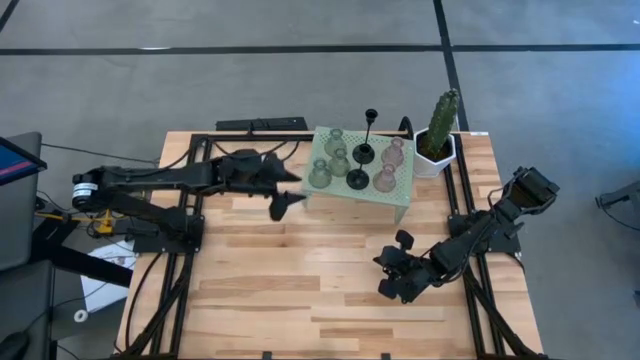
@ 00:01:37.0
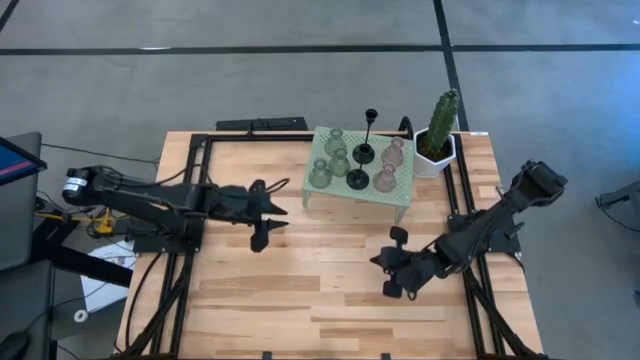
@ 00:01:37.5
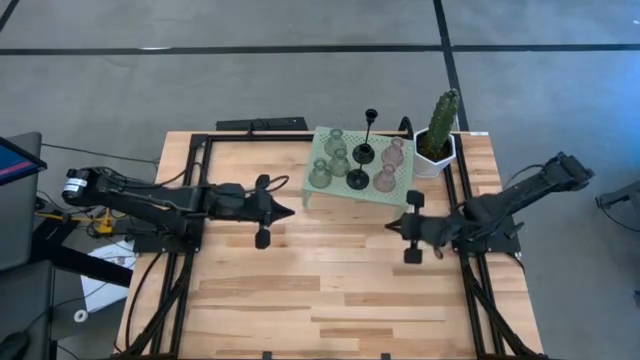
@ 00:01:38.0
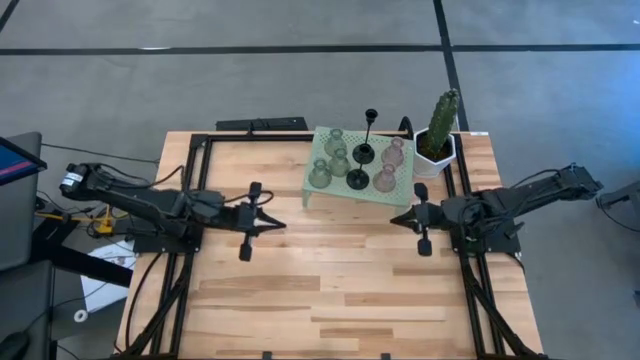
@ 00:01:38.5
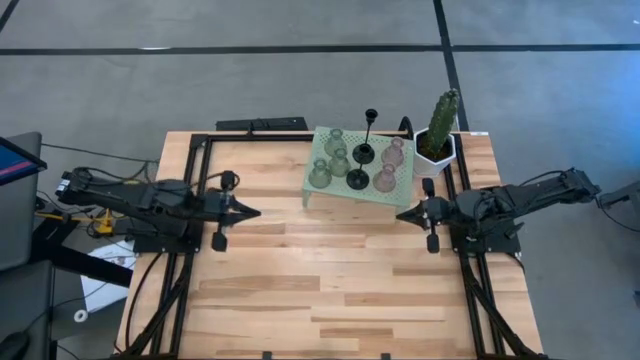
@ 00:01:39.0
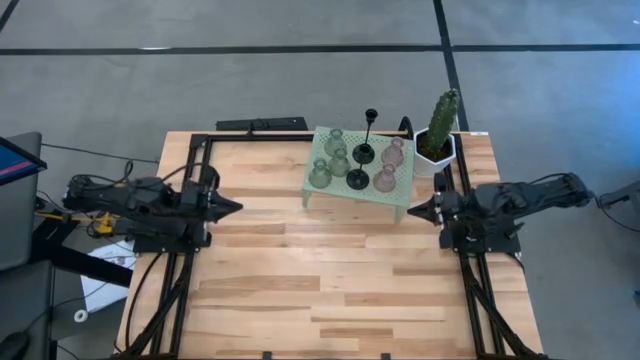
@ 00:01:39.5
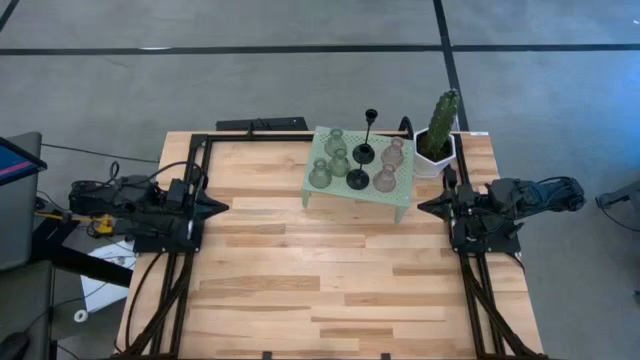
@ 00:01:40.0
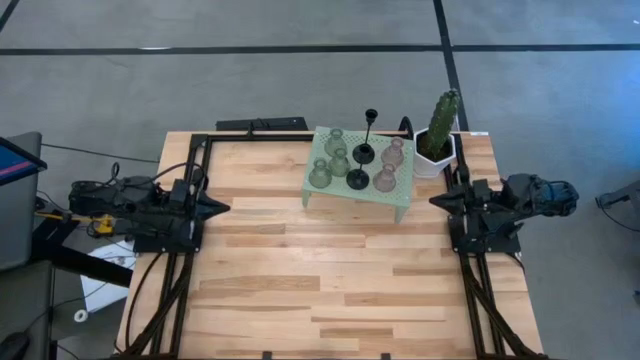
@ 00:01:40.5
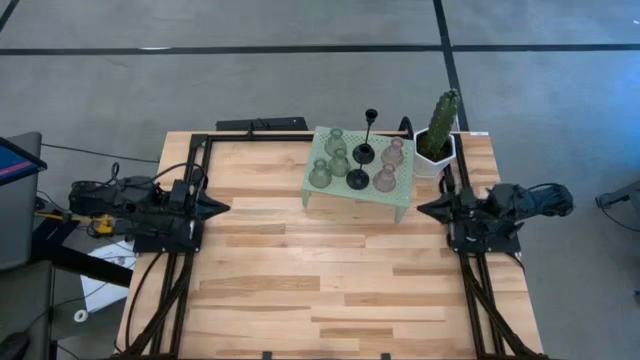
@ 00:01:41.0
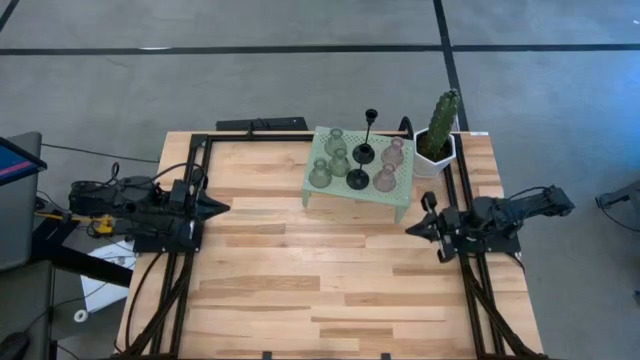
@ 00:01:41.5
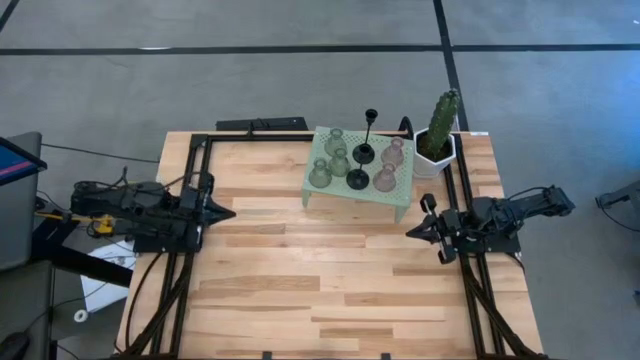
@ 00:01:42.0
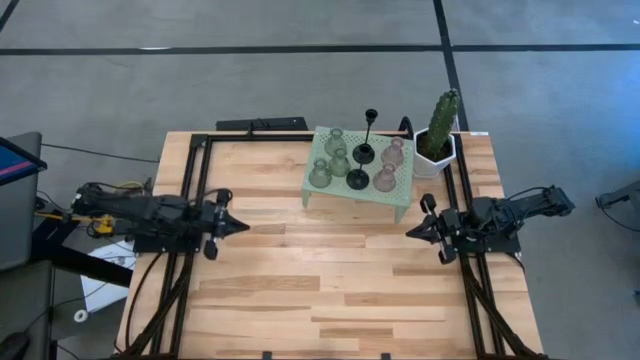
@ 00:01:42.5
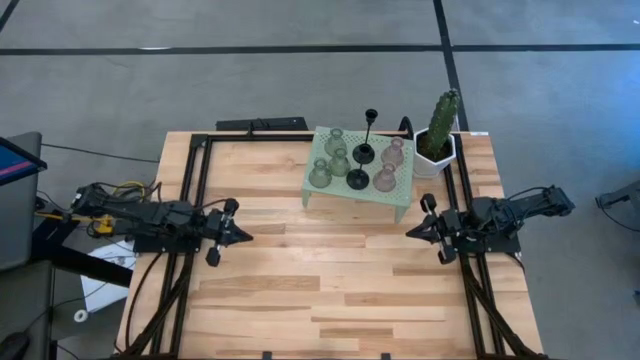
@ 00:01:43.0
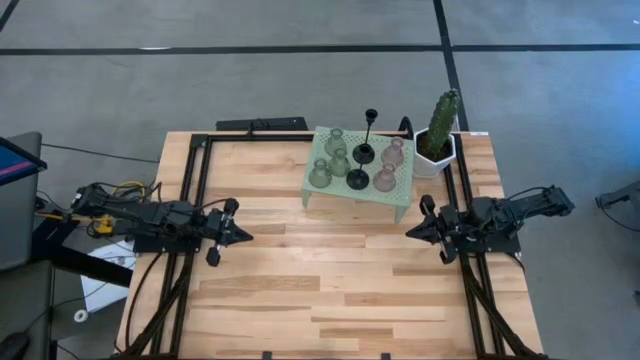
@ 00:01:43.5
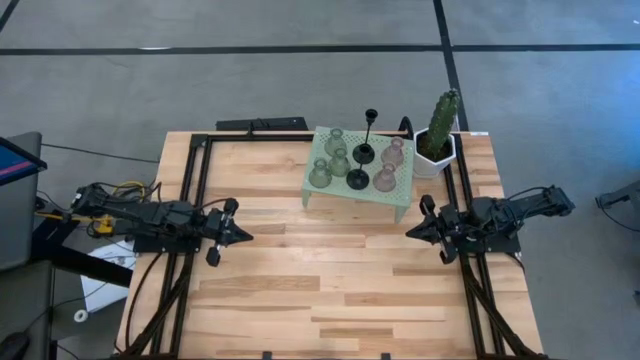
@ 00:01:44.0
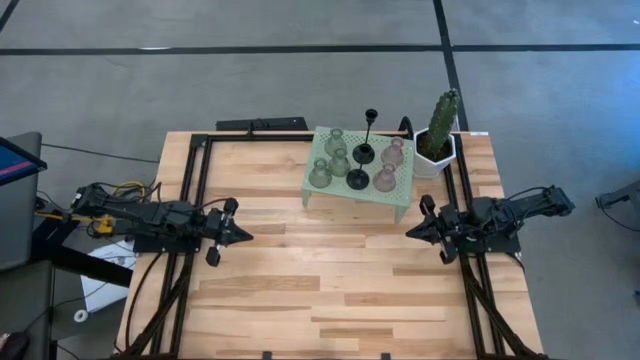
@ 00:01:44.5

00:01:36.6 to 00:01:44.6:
Task: Pick & Place candle stick holders
Return to Home Position

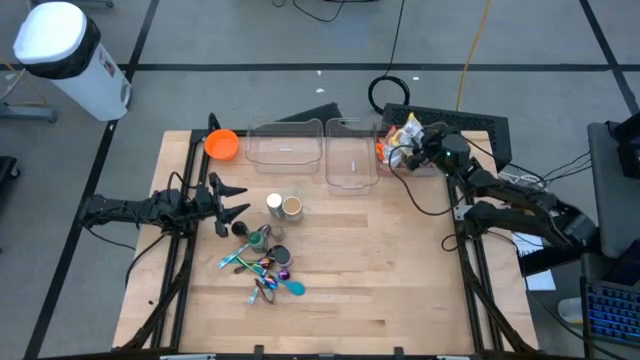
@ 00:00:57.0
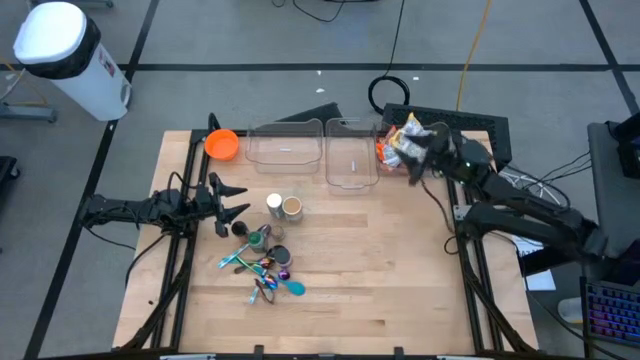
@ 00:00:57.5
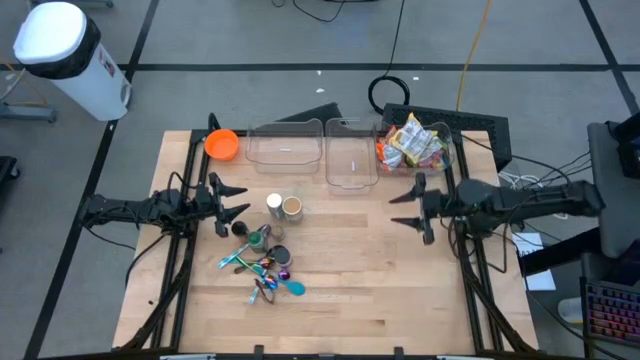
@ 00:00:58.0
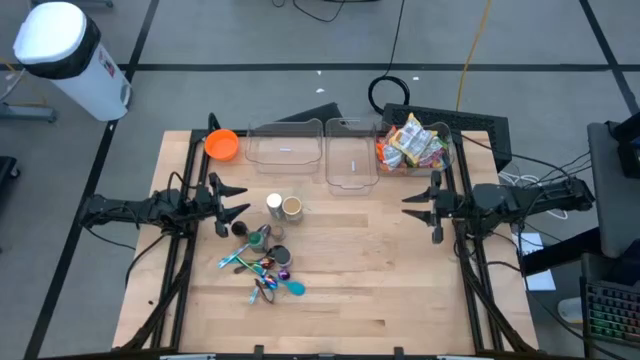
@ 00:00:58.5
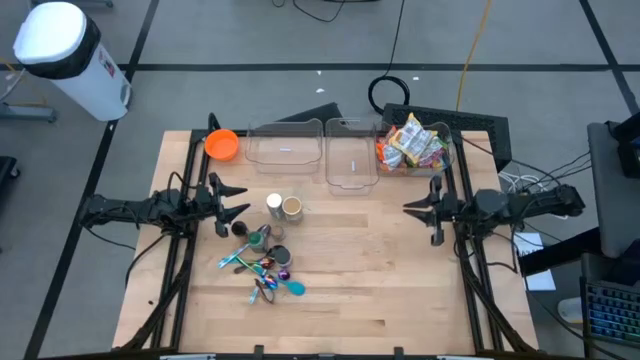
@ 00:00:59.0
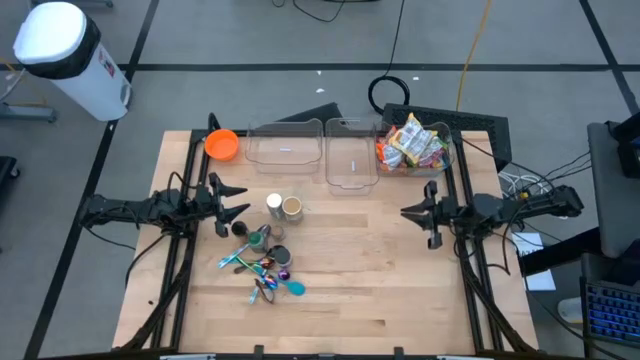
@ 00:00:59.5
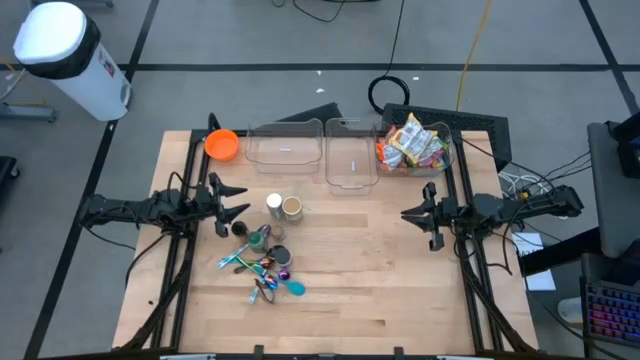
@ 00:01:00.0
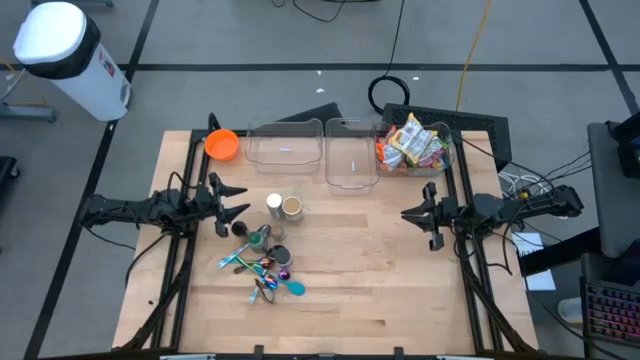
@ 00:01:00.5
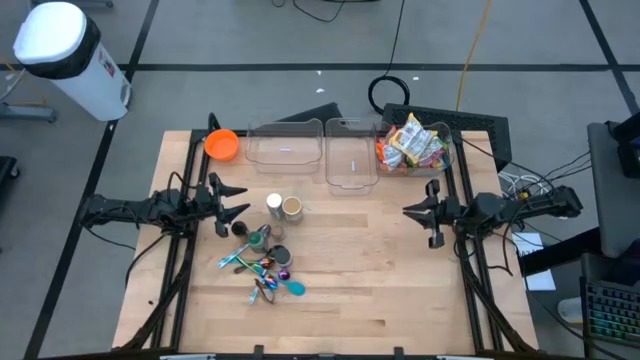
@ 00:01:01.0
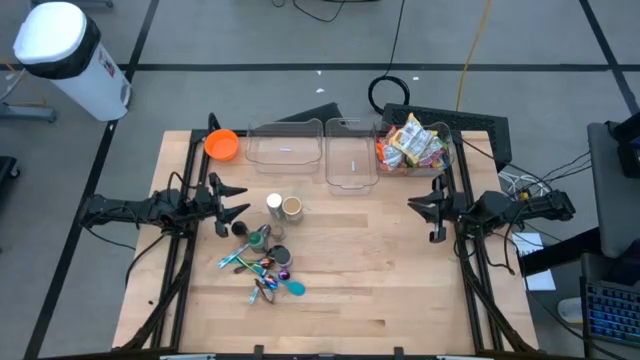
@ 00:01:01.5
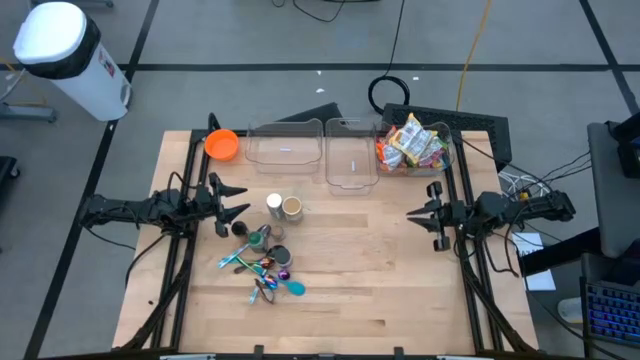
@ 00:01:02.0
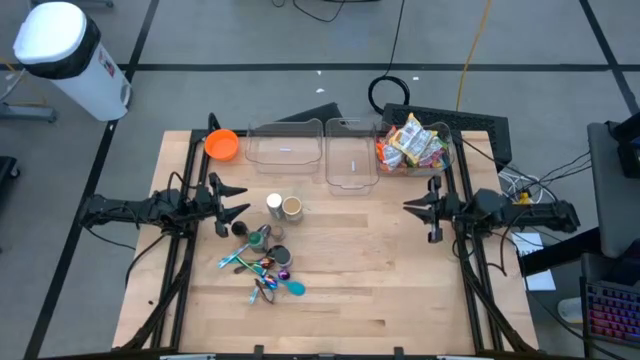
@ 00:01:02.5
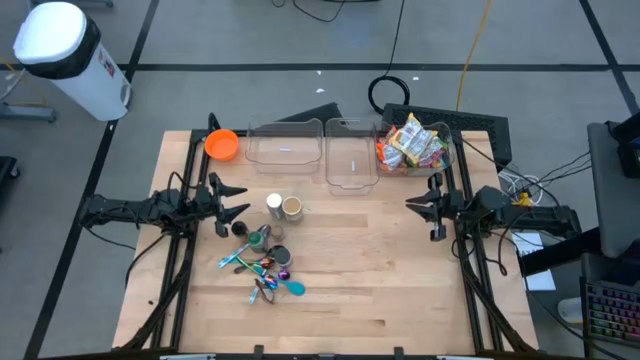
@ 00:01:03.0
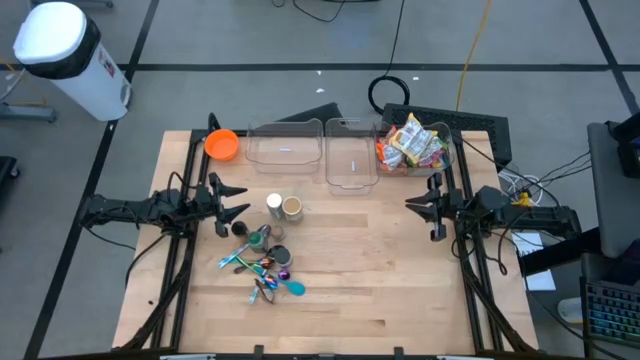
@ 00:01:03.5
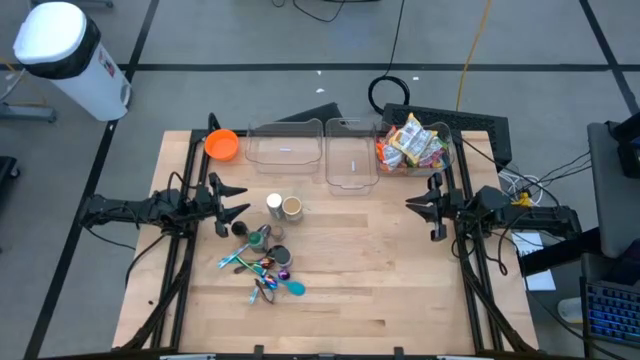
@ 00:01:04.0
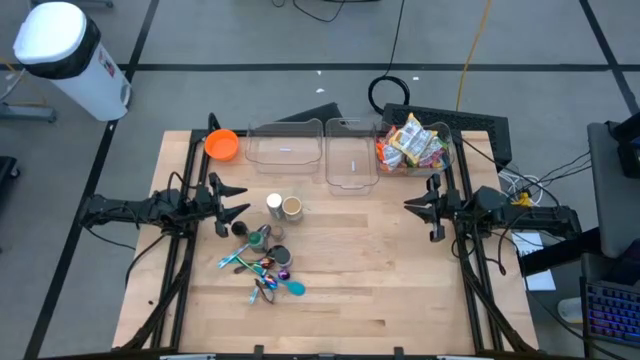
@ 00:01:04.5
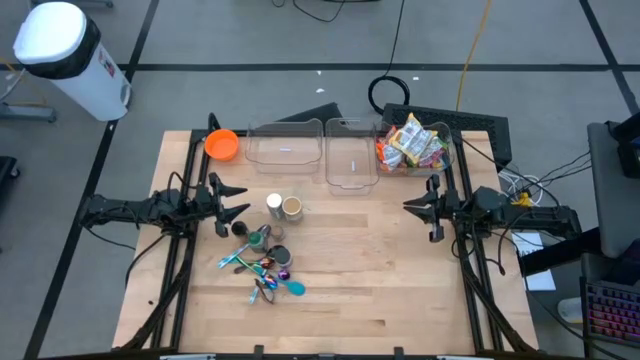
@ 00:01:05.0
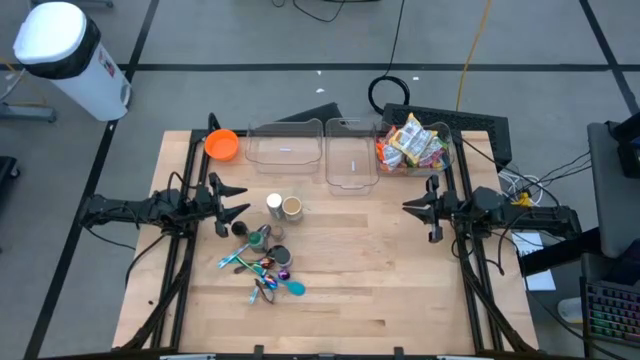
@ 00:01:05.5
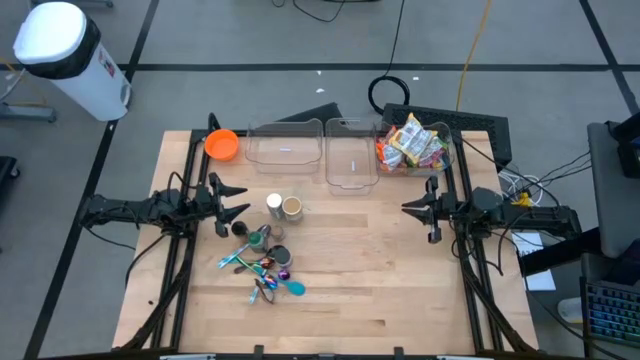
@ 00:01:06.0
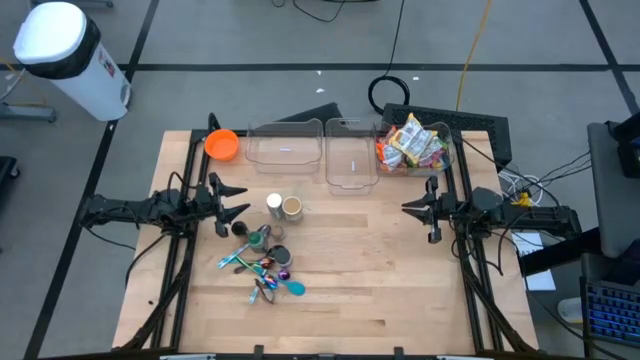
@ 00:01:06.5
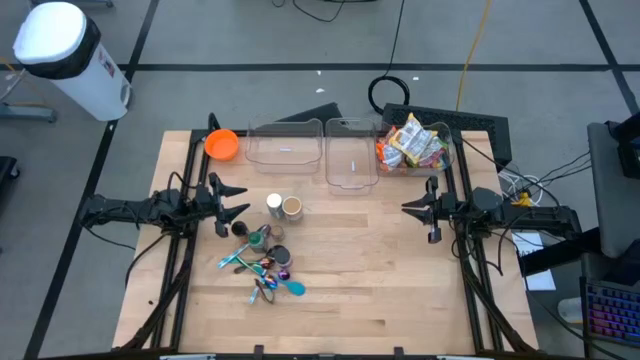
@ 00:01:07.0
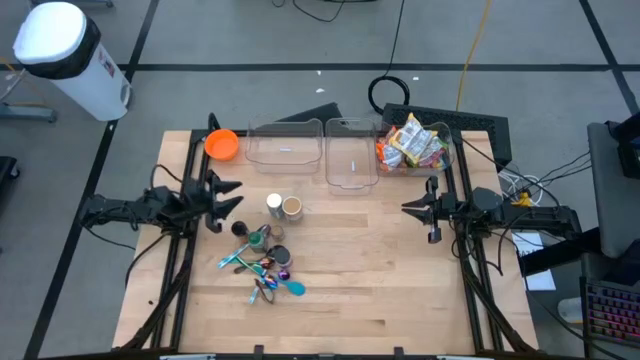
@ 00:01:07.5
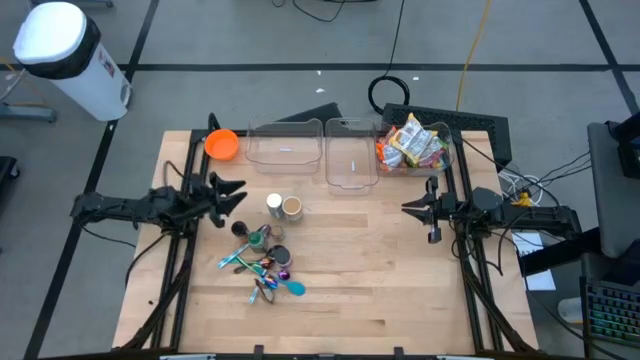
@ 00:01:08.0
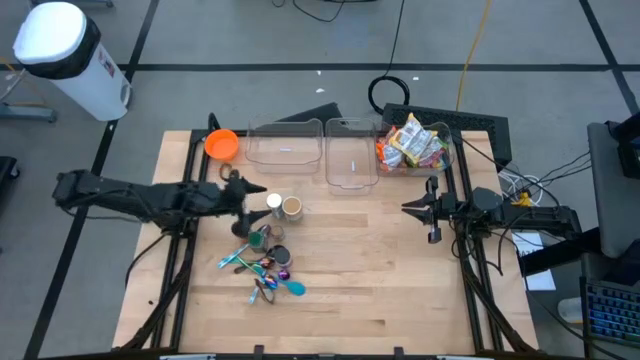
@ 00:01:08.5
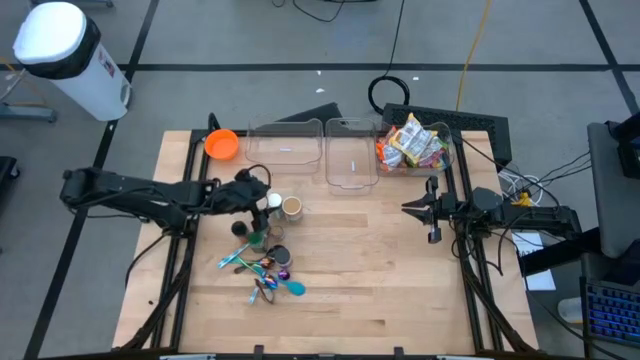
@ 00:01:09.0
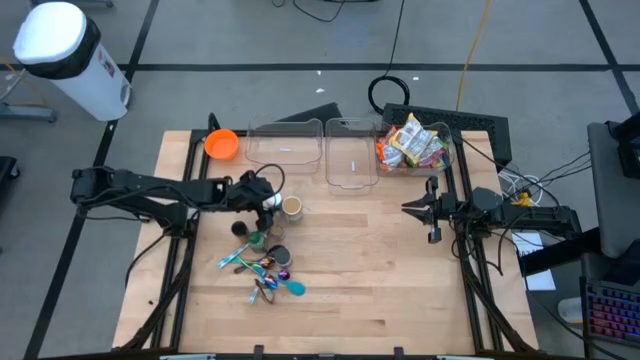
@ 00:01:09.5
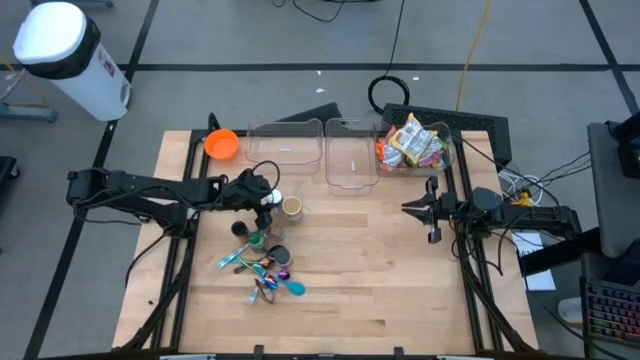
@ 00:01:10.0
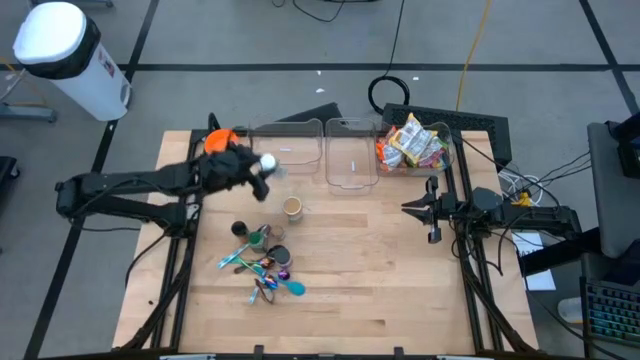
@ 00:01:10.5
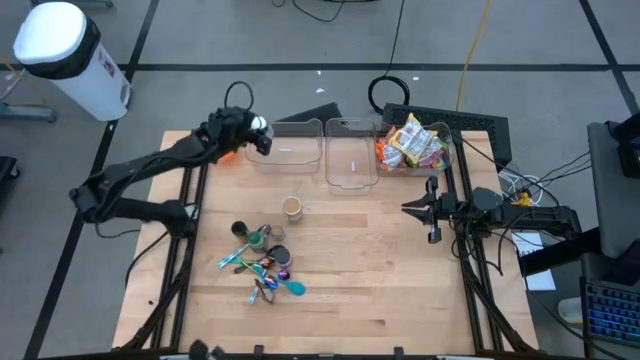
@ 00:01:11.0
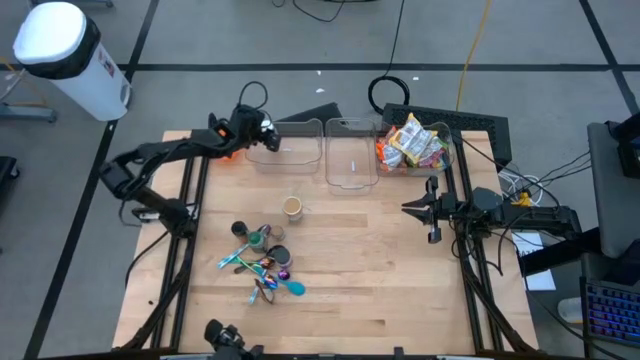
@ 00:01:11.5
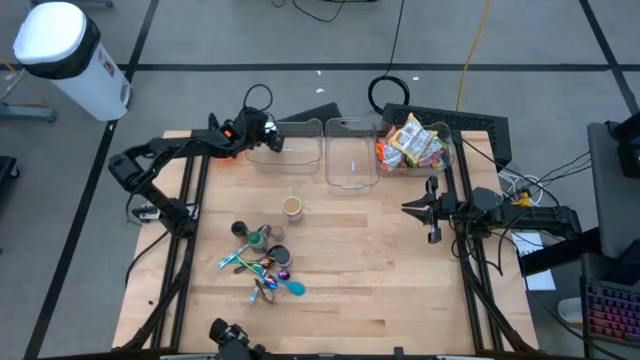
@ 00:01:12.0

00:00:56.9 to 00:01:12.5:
Task: Pick & Place Food Item
Put the white seasoning bottle into the left transparent bin
